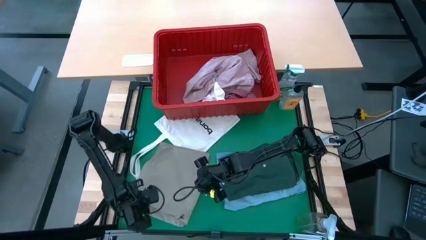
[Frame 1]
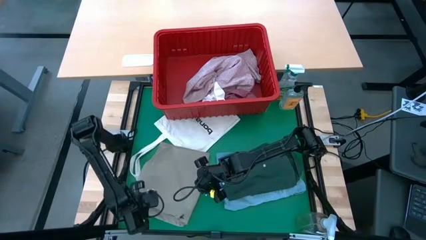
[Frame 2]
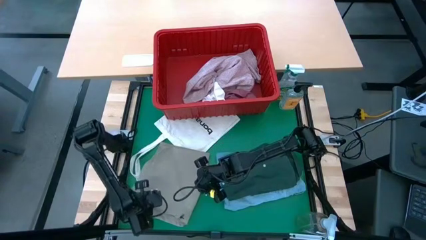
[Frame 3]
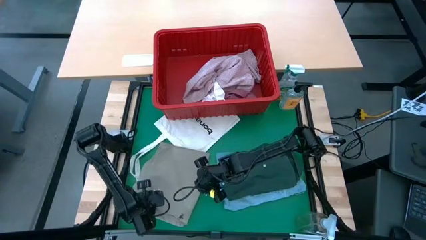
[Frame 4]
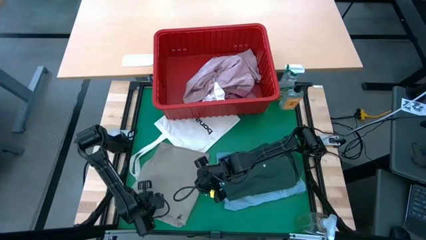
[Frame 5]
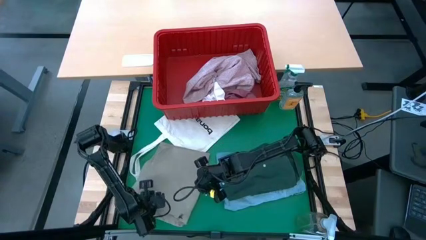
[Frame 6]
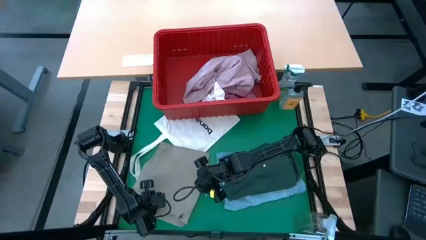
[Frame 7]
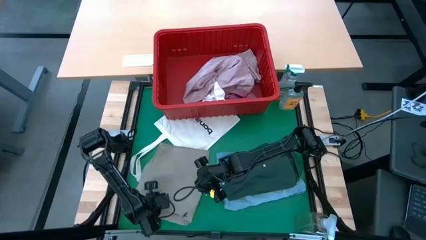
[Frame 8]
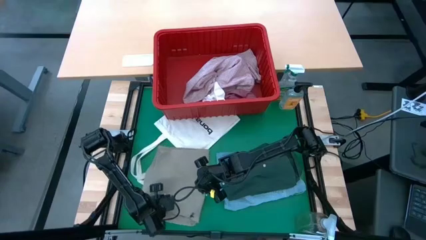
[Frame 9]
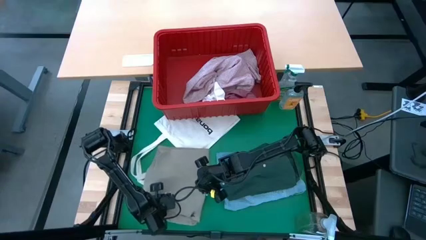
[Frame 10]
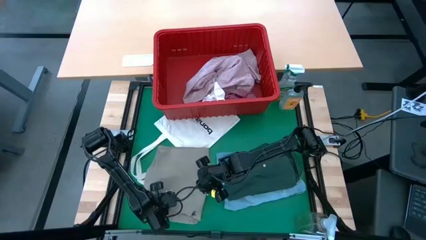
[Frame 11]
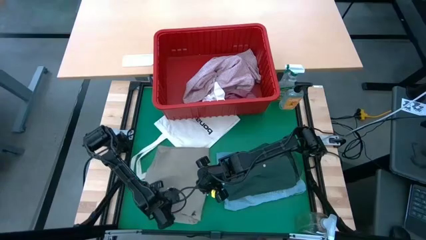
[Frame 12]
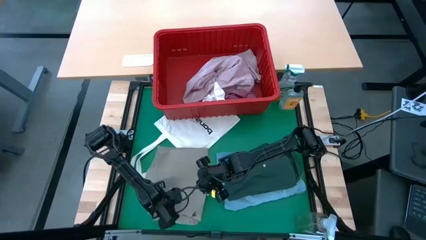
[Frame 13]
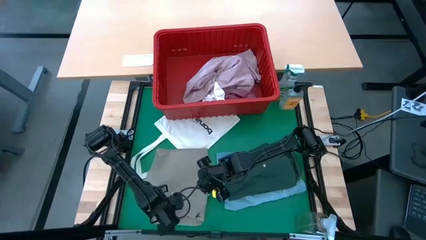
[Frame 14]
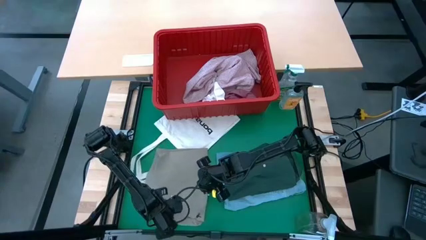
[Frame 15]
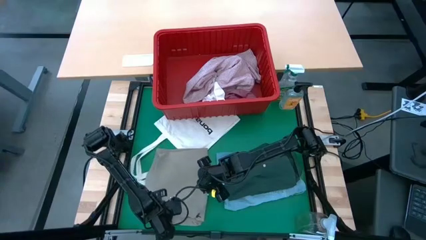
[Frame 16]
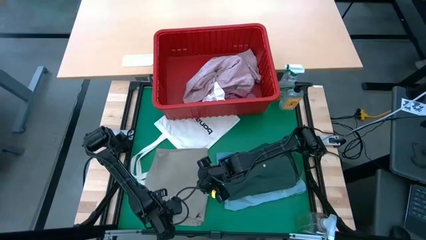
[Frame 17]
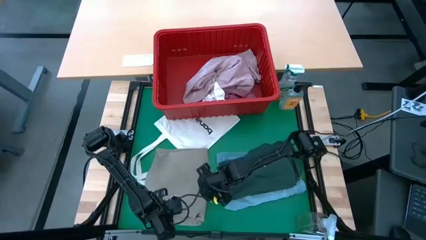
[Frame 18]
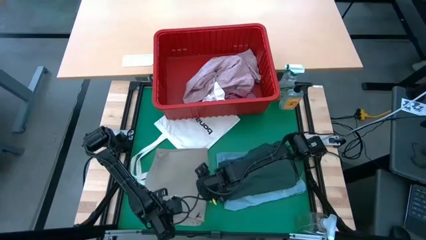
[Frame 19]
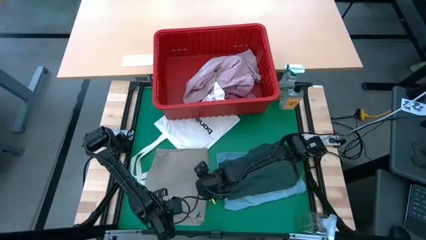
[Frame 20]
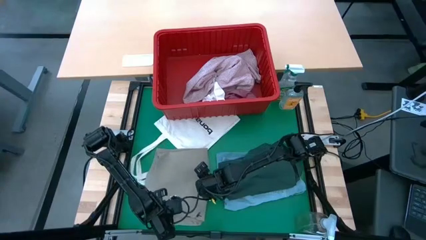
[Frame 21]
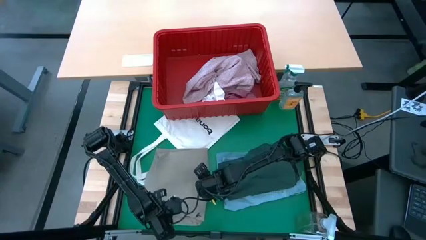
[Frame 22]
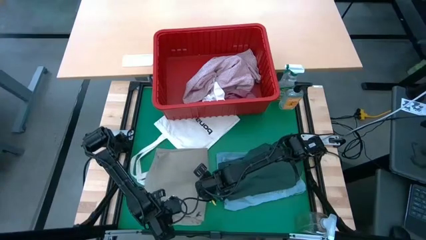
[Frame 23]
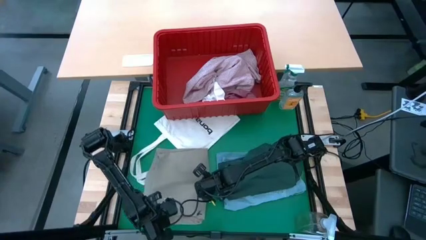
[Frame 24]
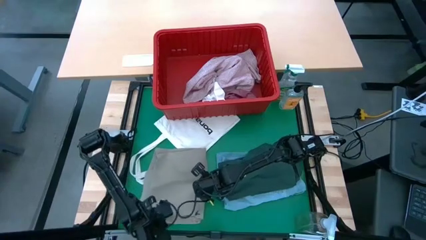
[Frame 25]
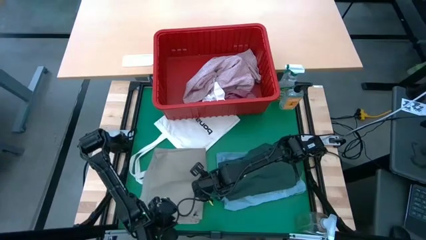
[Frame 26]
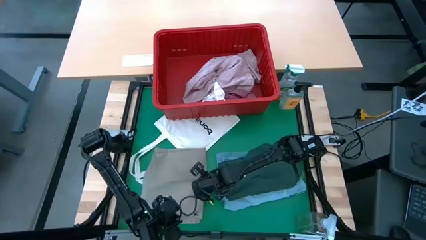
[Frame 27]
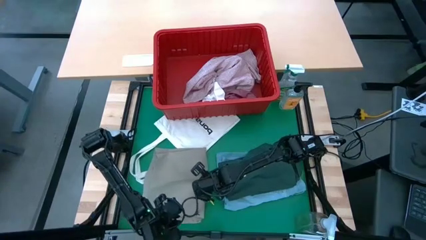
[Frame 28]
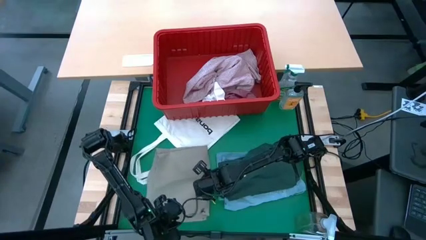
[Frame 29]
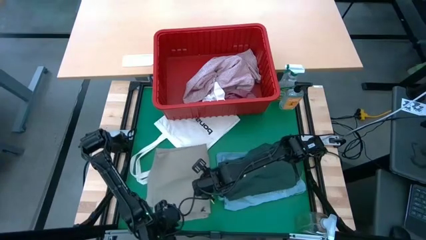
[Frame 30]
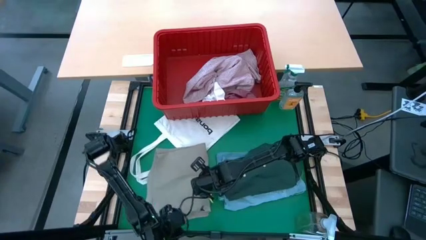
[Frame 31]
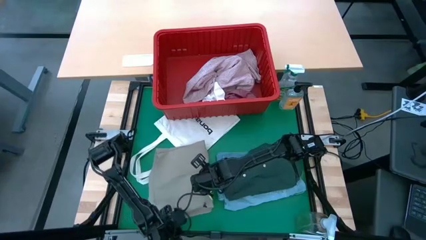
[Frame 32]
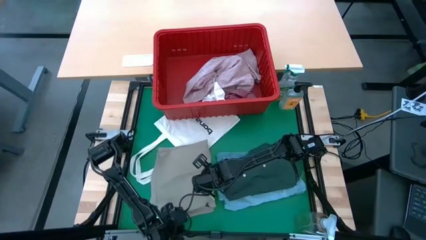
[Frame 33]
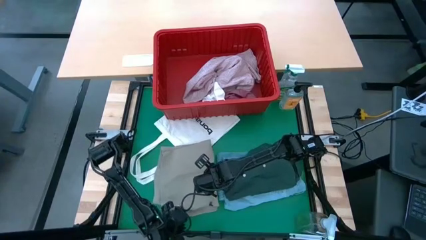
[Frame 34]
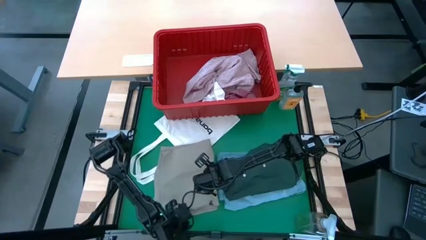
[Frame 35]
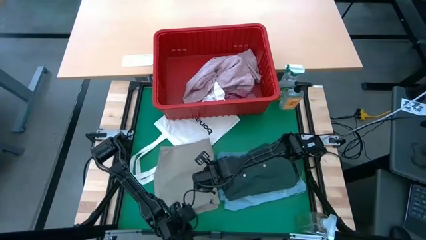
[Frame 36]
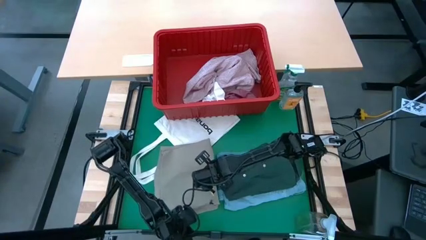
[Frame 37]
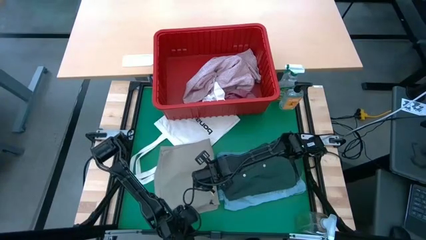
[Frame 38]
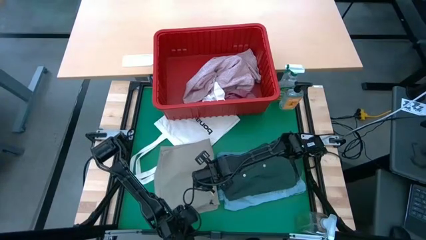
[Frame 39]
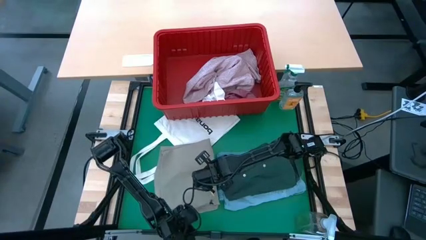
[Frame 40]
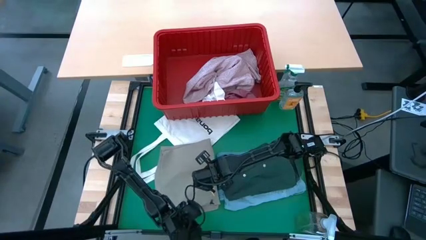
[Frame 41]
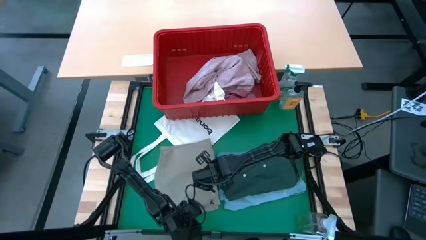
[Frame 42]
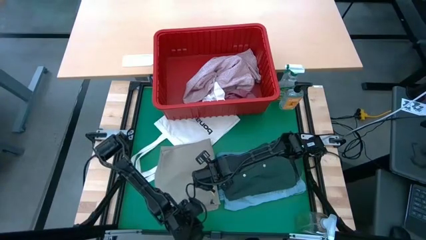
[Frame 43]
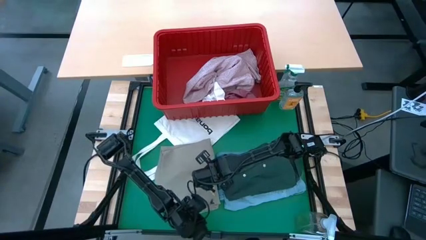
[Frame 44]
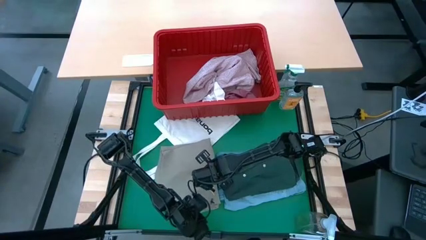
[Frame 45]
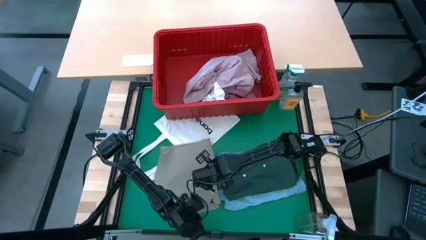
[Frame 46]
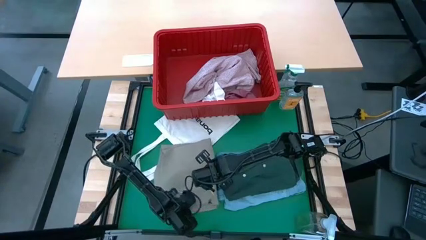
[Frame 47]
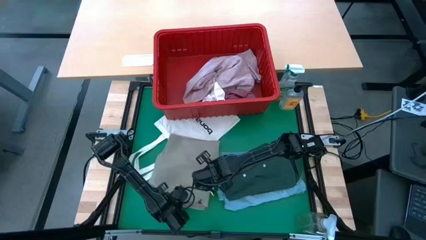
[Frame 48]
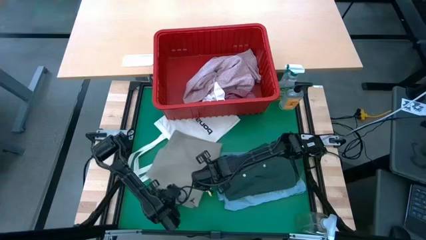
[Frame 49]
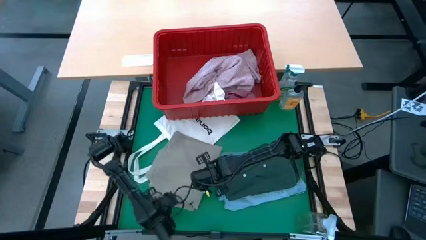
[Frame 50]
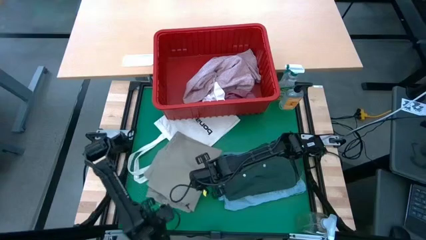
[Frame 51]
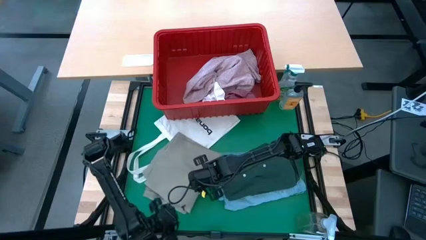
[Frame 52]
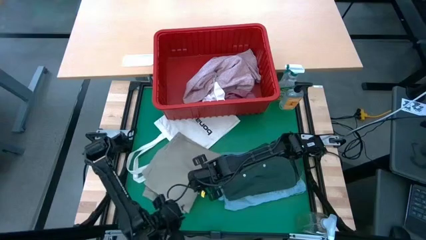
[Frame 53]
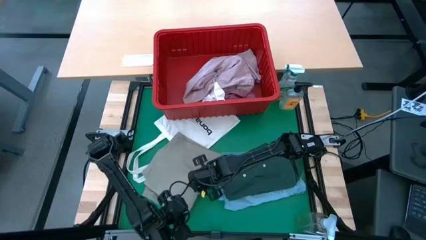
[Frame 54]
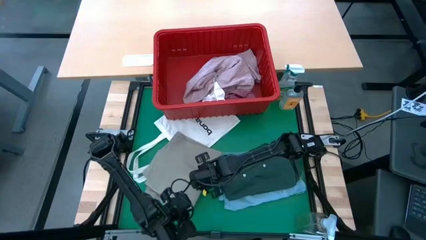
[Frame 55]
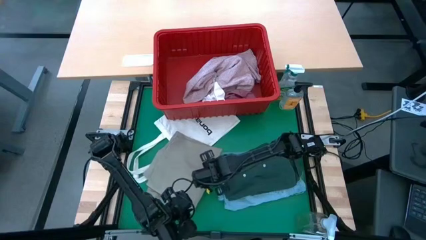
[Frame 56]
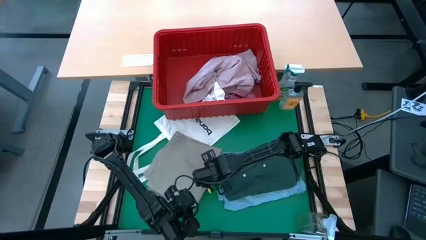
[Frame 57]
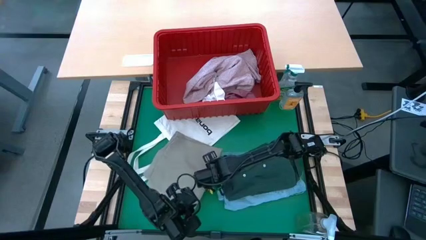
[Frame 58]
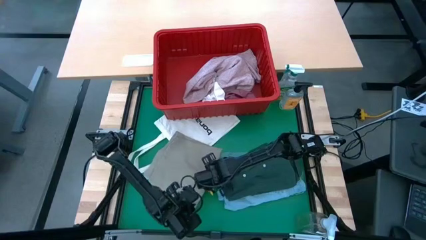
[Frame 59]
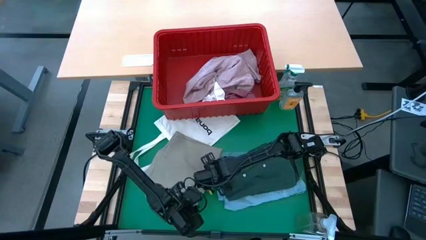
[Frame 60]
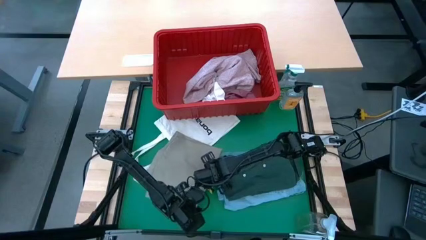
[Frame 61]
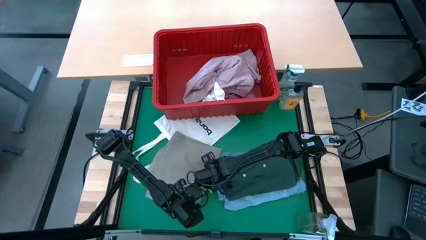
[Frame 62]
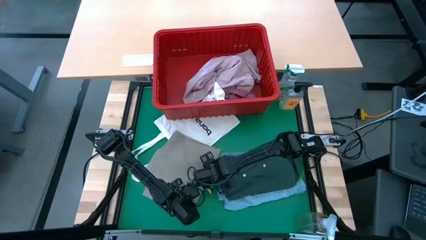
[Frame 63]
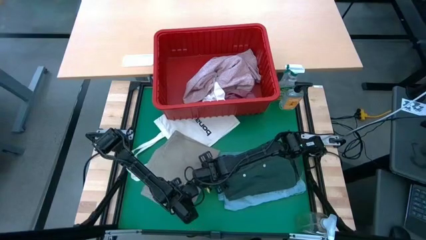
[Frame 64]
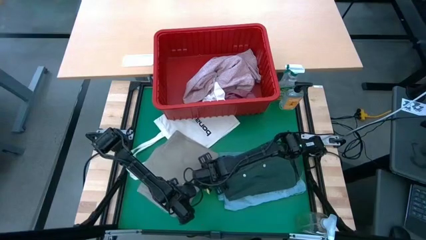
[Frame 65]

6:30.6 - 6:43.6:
Task: Fold laundry
Stack the gray shorts on top of the green shirt

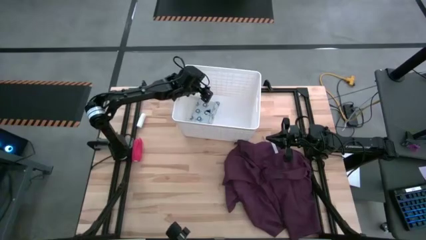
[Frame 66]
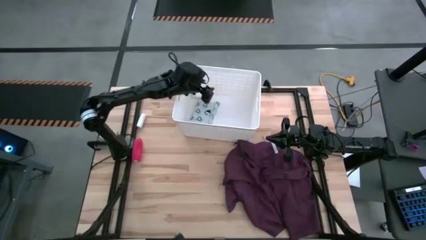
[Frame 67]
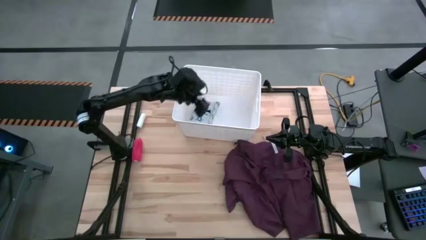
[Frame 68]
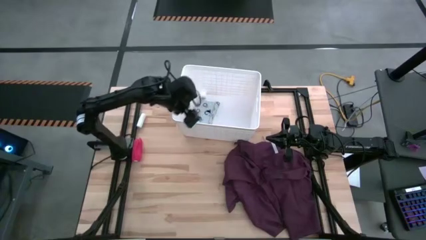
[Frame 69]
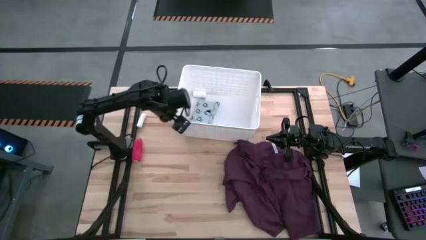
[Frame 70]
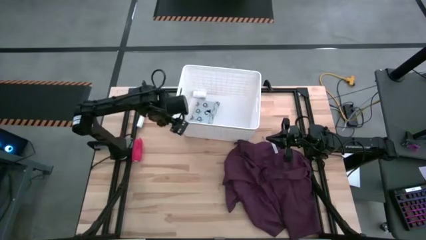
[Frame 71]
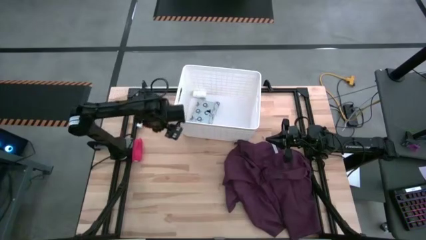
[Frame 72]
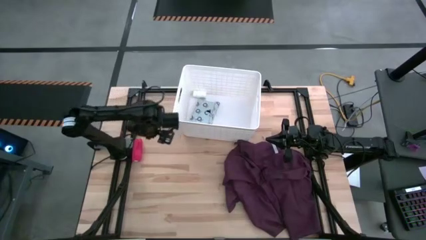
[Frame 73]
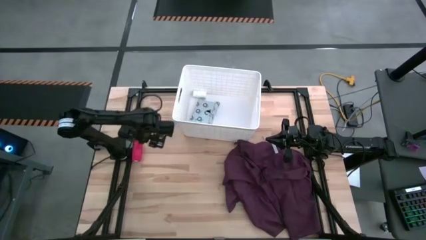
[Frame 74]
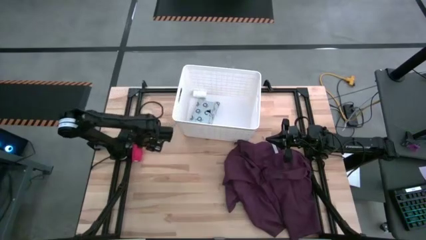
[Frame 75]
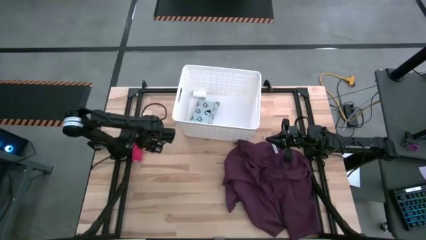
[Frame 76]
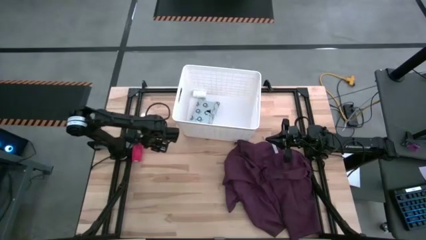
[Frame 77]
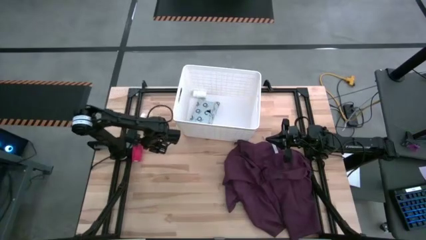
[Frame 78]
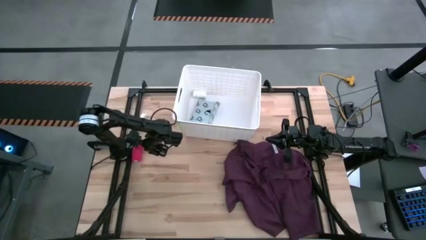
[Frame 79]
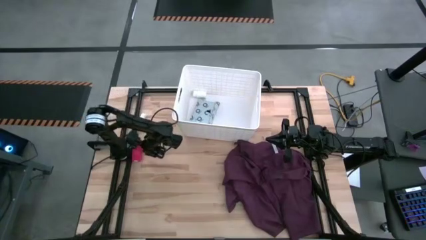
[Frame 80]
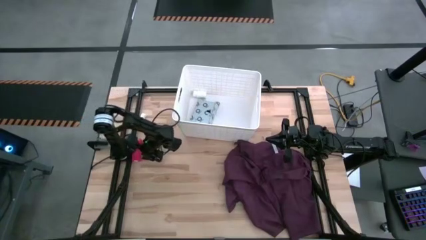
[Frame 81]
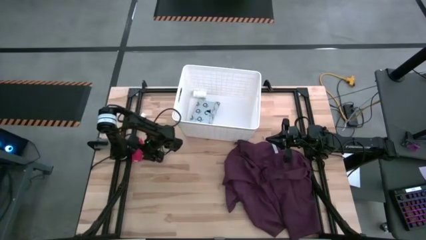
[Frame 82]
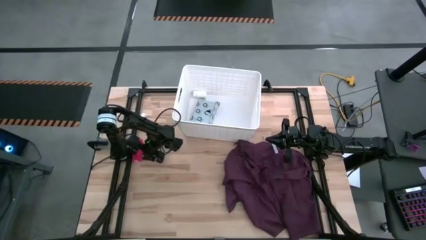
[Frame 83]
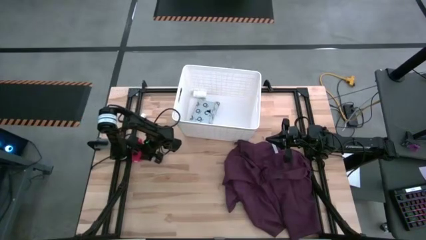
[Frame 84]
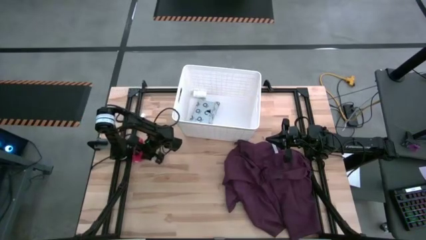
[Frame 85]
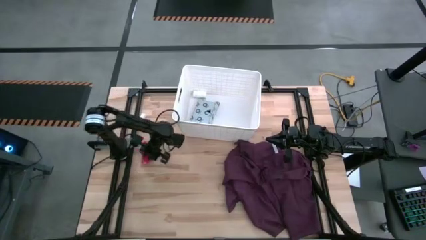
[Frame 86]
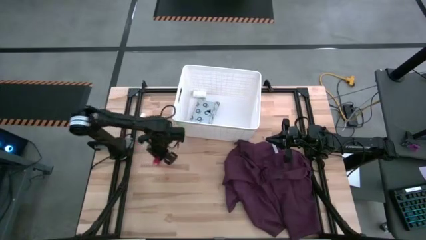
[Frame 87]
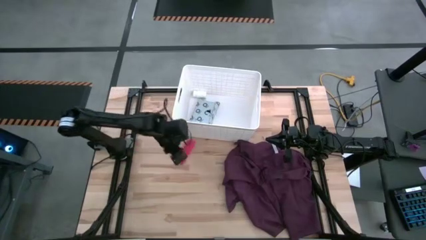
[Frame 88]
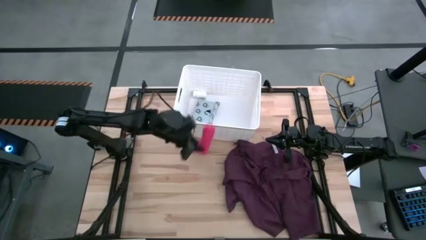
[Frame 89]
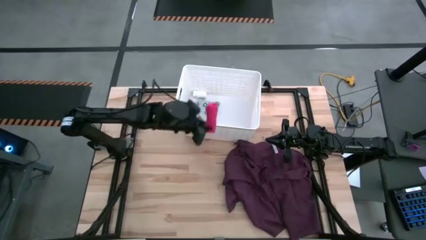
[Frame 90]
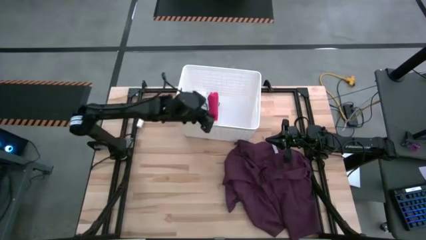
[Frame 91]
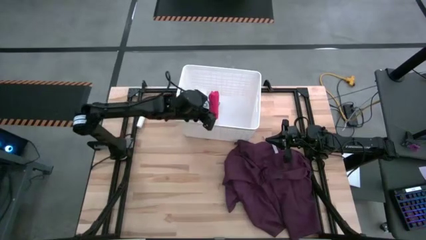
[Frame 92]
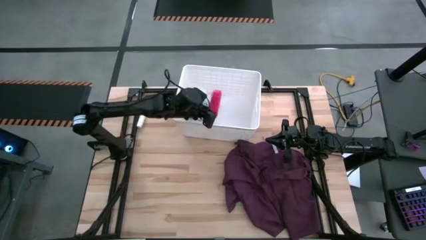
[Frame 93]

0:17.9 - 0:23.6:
Task: Pick & place medical supplies in basket/bin
Put the red bandage into the white bin
